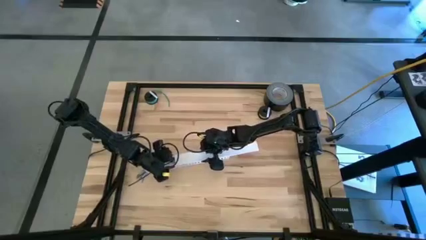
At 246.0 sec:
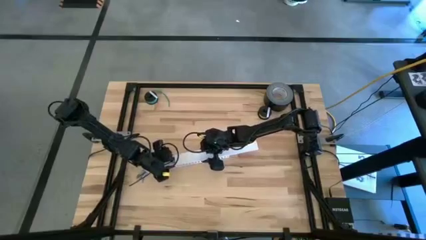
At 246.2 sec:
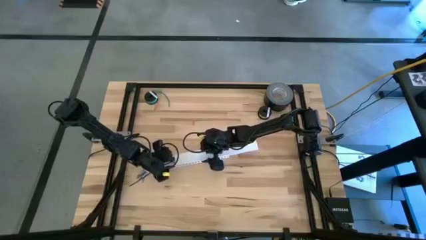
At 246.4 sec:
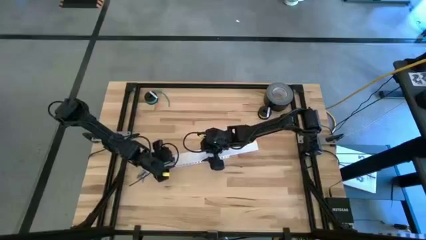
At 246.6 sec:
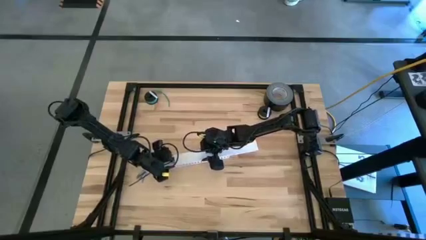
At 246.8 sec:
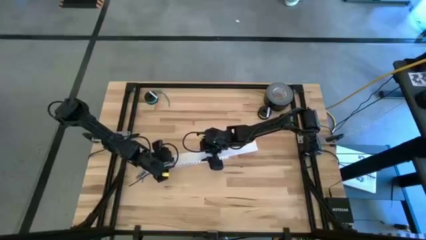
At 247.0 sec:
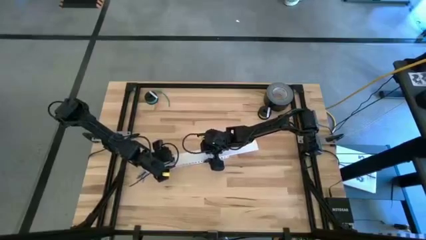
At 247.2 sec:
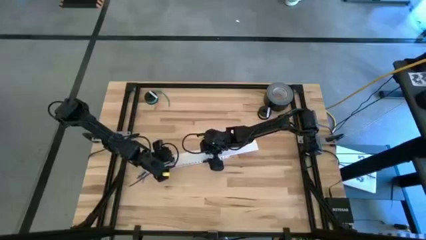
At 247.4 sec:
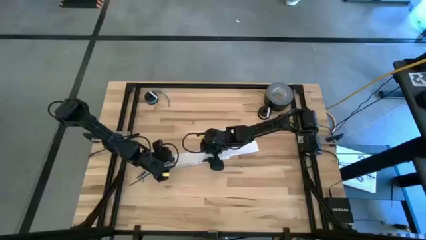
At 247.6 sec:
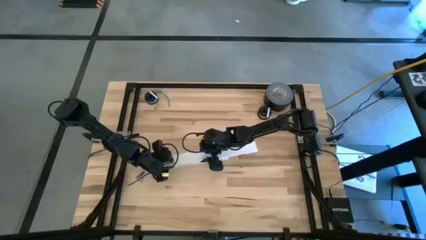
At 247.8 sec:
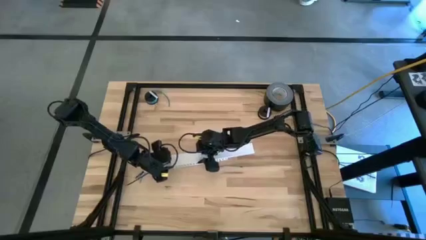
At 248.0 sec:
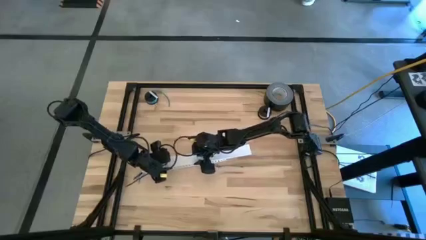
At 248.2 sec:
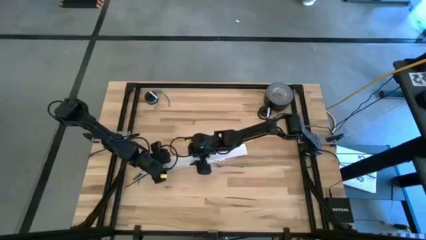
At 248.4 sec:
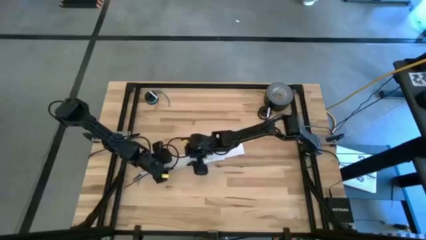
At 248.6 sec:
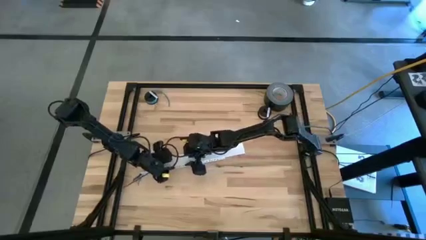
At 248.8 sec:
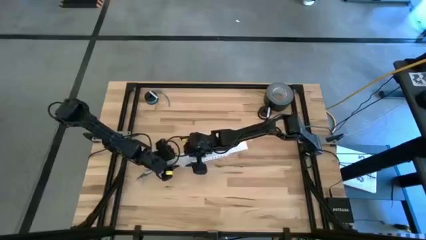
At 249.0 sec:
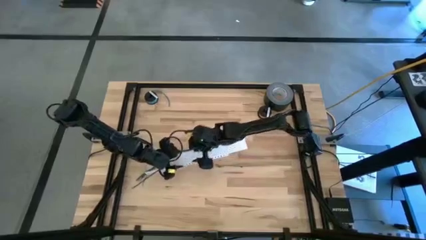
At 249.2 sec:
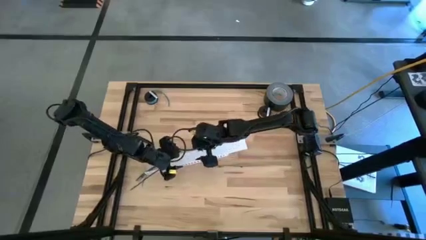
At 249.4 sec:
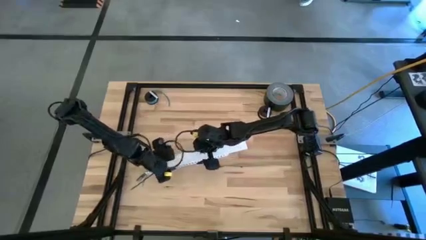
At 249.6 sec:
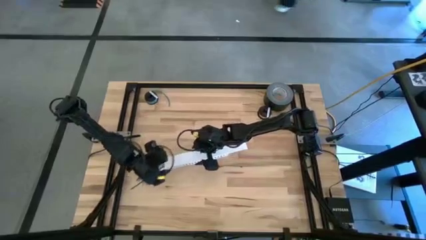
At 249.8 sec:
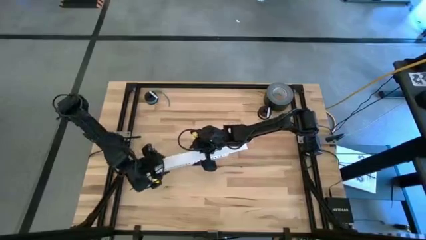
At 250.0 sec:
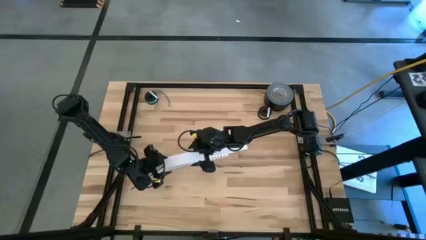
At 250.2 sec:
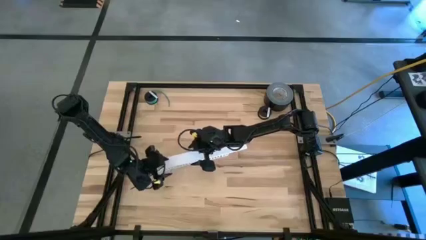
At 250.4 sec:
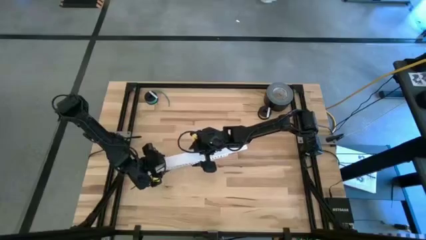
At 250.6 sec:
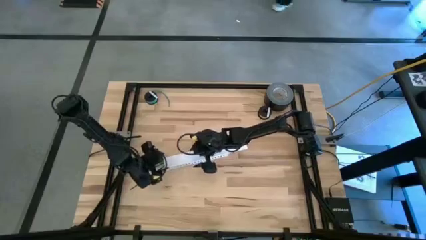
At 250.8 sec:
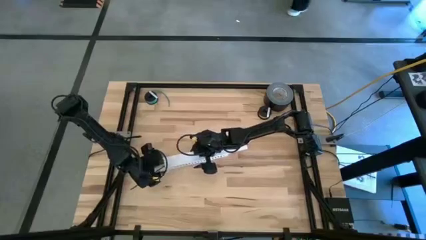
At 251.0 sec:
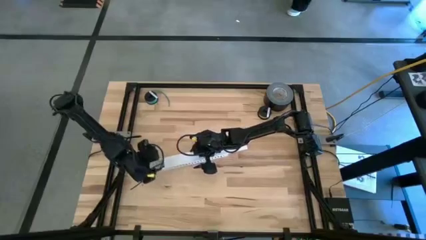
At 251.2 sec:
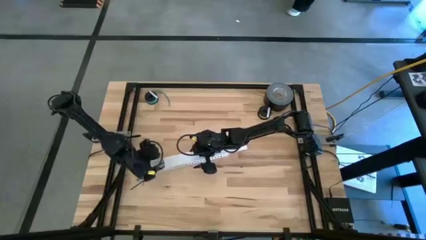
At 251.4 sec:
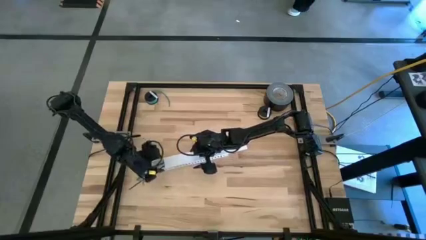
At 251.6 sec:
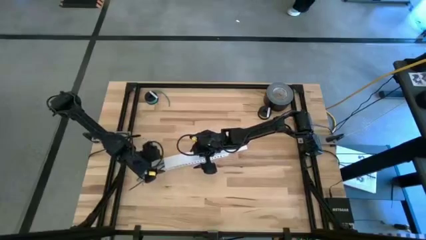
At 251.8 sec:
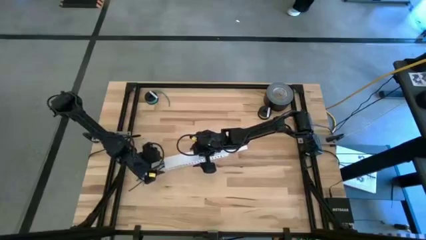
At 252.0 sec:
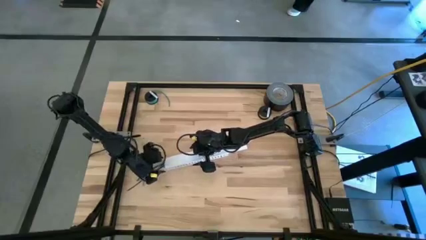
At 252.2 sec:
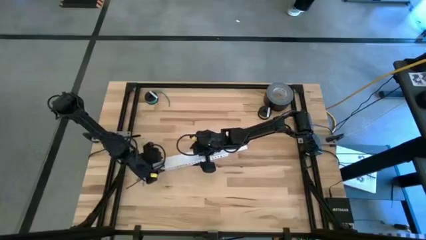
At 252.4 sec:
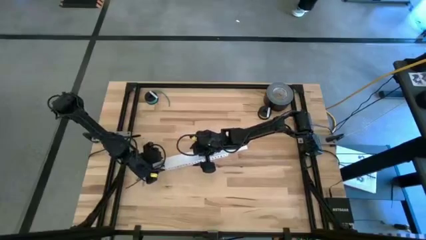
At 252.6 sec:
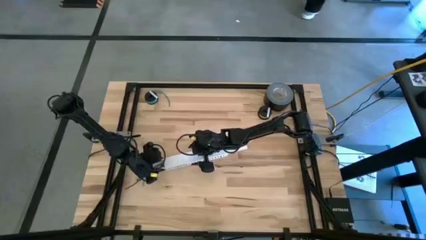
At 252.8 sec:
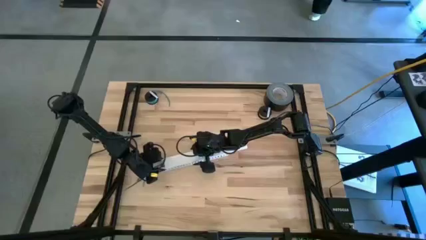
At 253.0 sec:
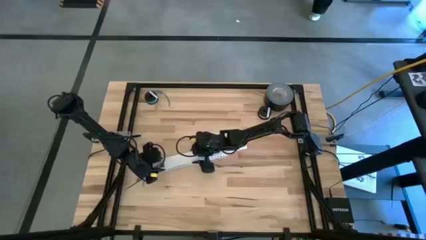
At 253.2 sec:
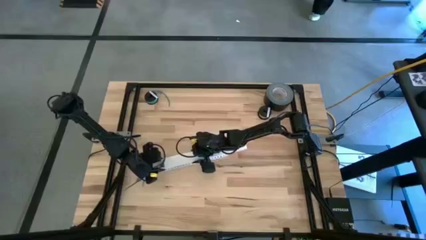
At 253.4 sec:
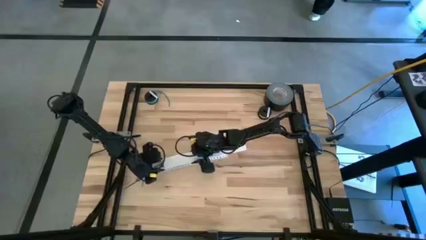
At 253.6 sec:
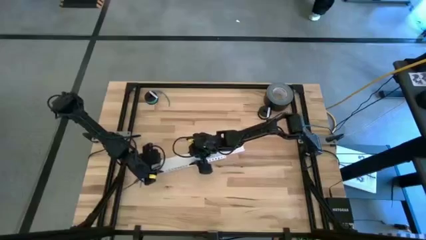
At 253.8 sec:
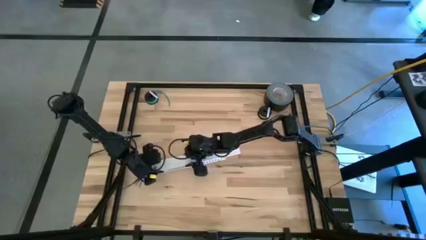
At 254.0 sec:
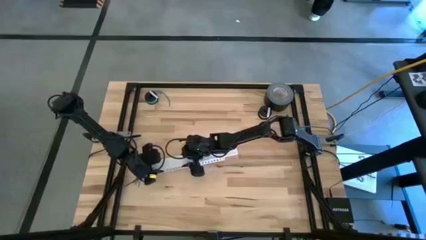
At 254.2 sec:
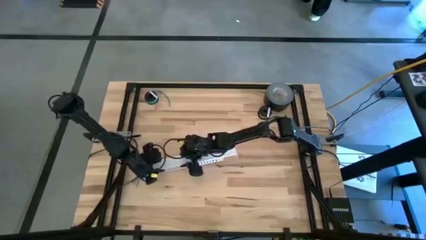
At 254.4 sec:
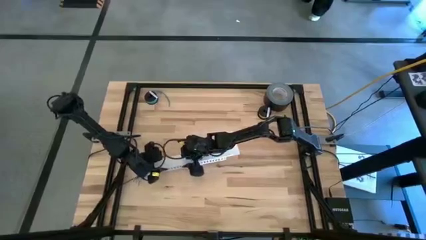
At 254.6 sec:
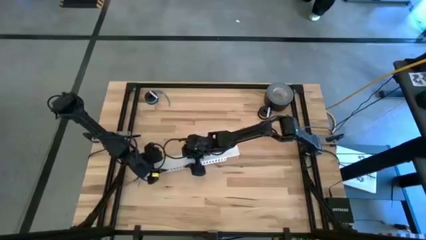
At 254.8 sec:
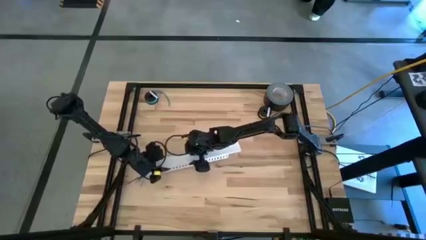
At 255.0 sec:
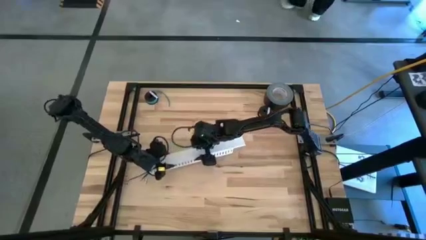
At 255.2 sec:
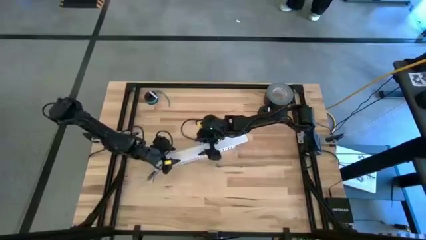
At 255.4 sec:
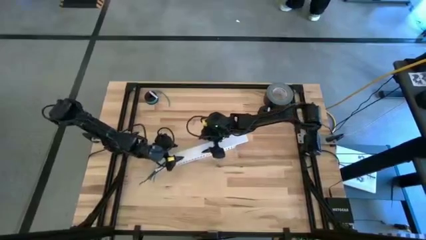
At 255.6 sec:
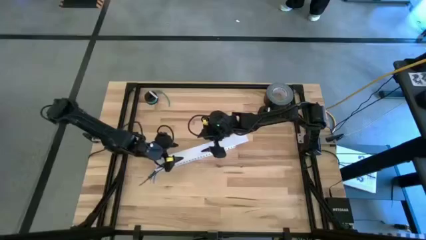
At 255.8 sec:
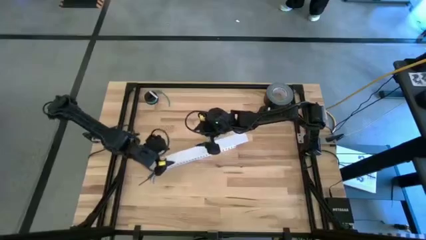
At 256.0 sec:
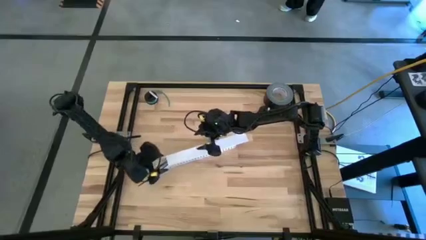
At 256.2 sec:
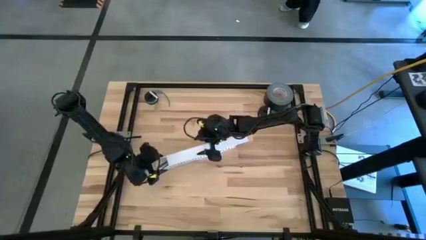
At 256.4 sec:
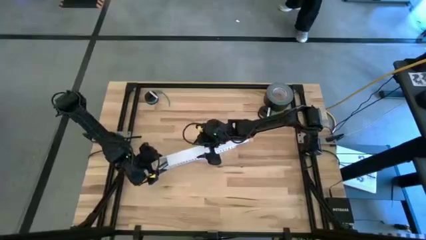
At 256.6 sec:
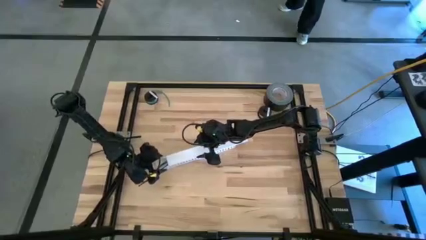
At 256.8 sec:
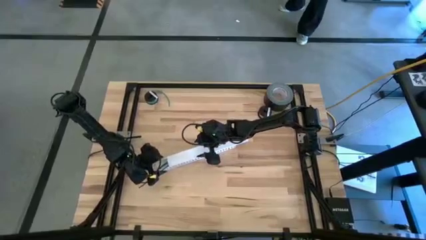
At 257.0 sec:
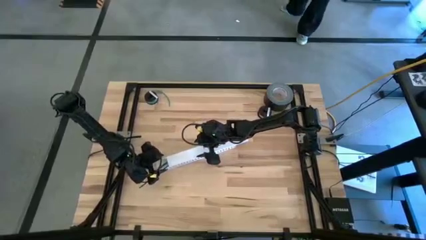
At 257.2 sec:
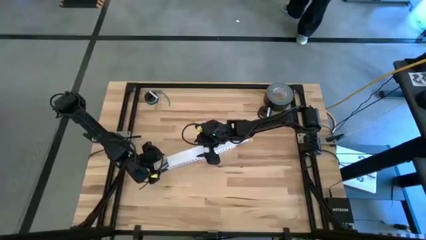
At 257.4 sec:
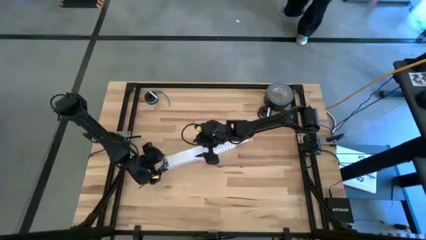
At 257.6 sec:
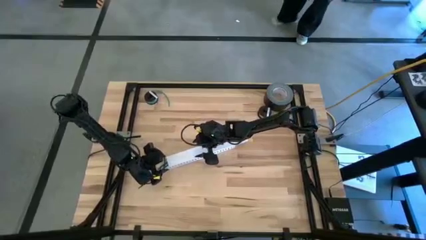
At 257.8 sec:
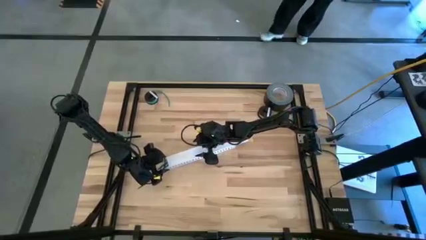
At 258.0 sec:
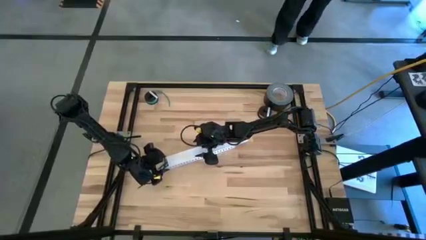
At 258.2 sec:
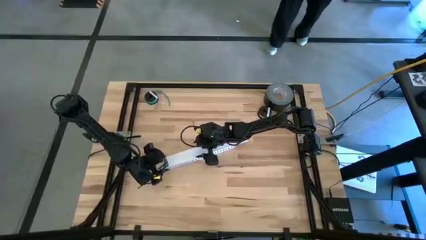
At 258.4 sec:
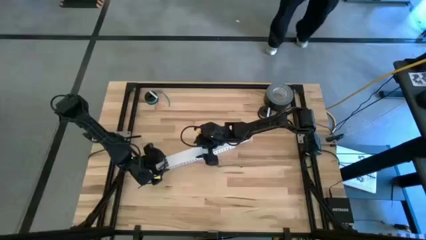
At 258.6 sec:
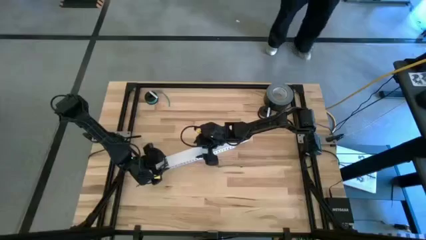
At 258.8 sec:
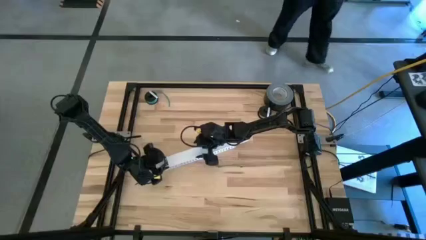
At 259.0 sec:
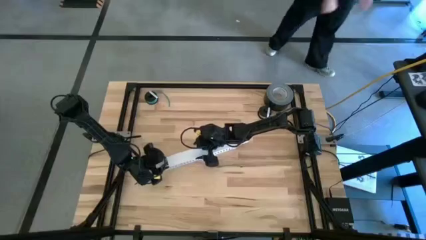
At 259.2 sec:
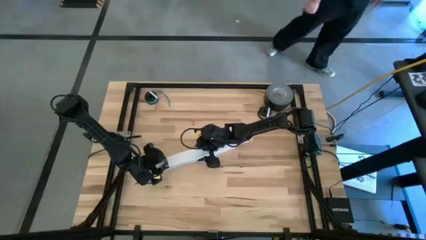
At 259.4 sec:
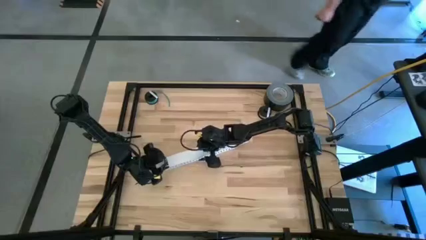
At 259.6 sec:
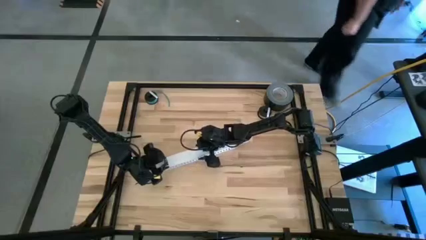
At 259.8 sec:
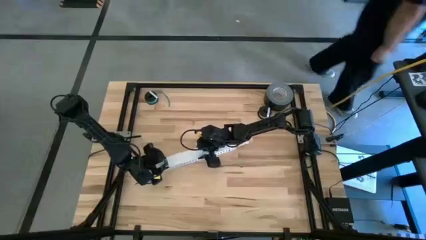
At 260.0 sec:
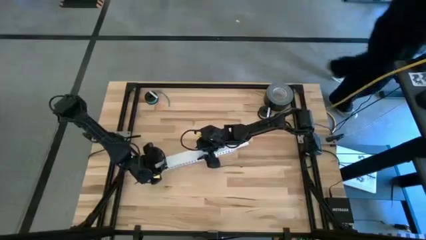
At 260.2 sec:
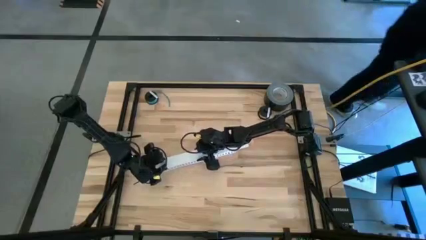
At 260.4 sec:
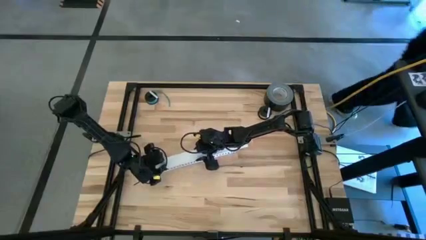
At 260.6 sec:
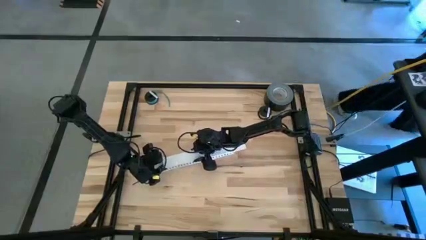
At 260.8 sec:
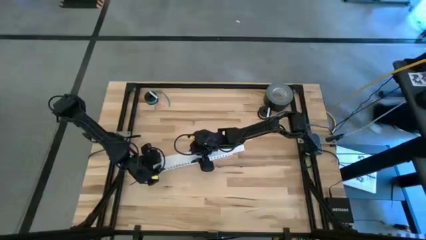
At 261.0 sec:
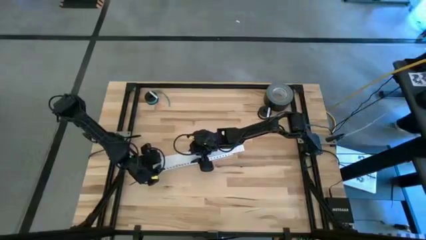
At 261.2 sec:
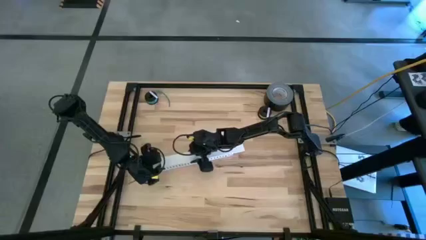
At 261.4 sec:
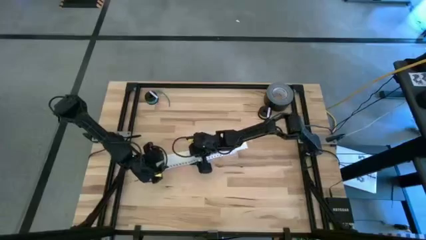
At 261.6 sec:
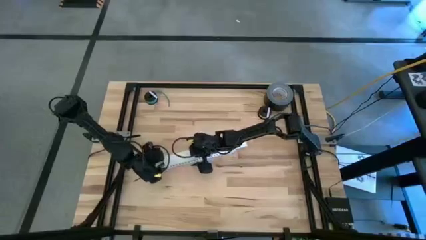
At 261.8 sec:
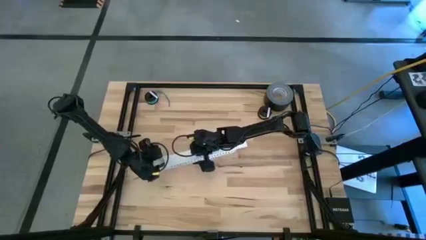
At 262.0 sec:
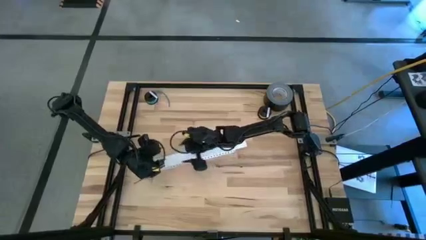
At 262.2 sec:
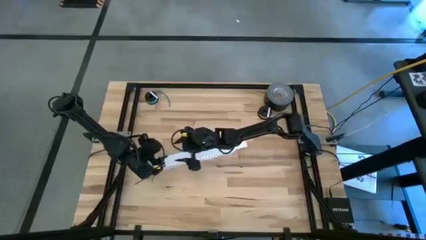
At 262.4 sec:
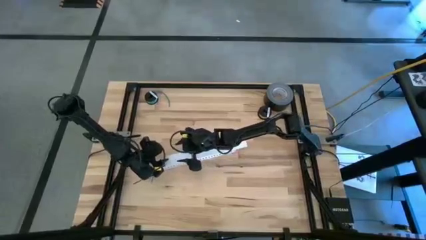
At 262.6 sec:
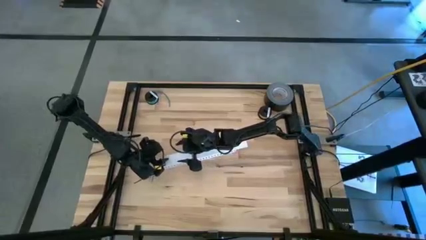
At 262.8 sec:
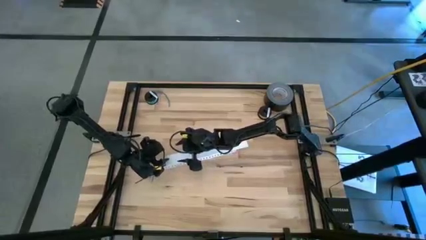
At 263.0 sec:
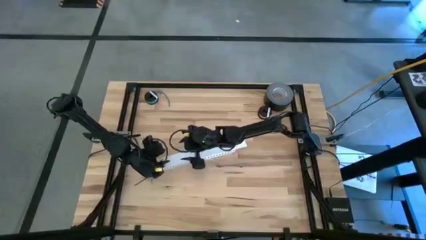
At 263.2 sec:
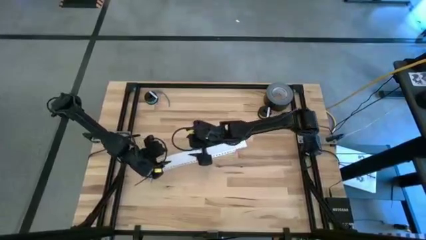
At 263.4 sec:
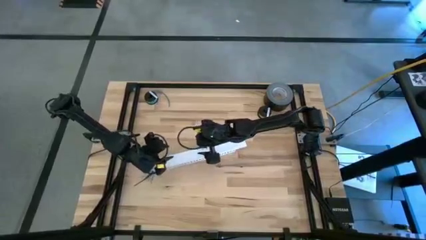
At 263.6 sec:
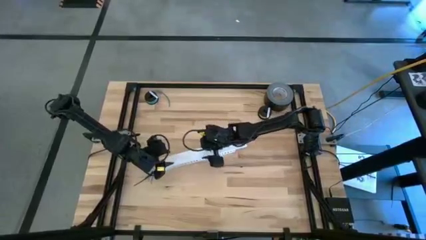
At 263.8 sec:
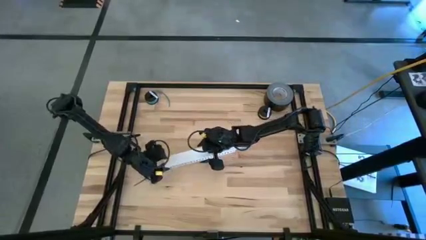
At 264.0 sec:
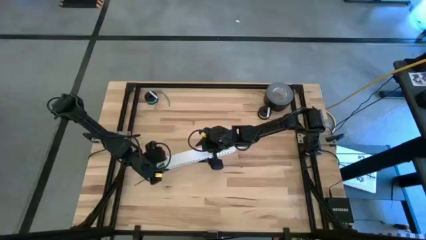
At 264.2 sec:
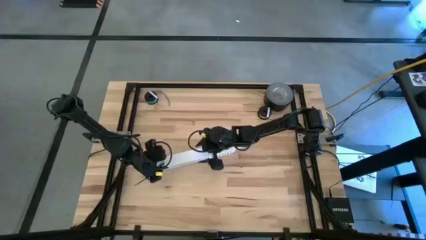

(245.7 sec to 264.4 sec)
Task: Ziptie cables
Close the white cable duct
